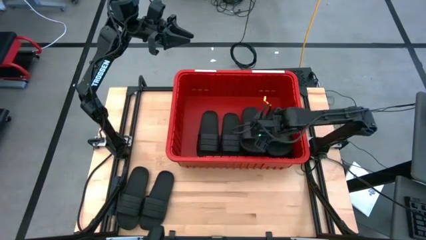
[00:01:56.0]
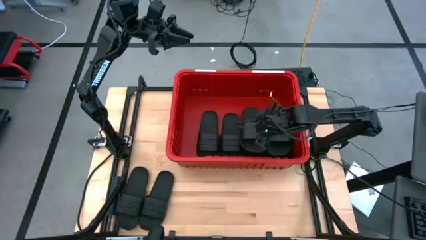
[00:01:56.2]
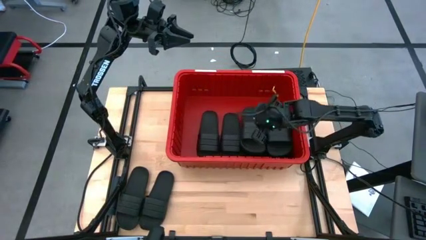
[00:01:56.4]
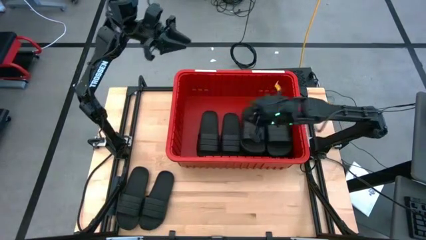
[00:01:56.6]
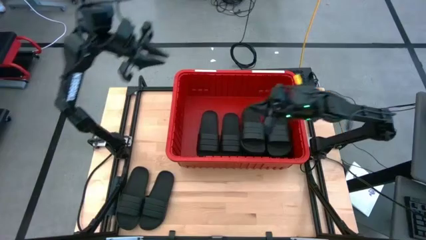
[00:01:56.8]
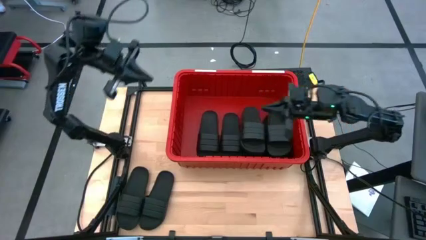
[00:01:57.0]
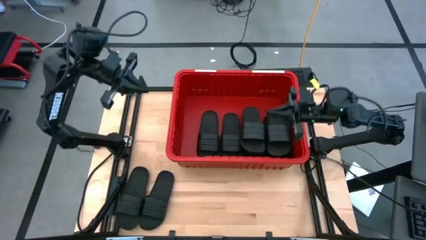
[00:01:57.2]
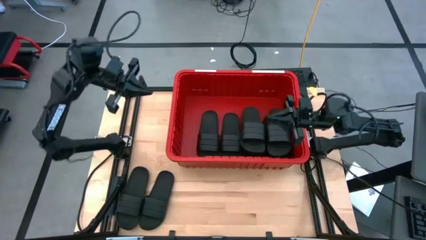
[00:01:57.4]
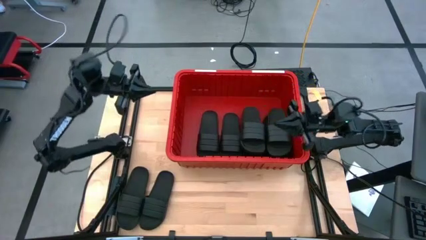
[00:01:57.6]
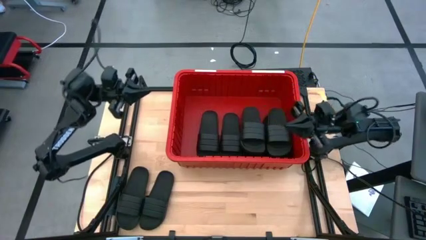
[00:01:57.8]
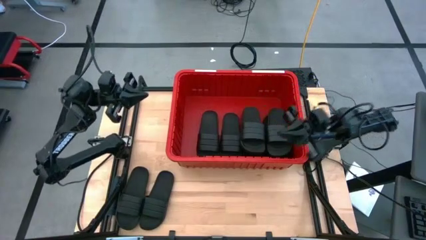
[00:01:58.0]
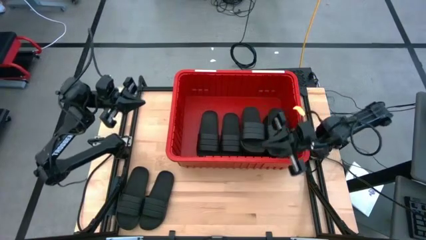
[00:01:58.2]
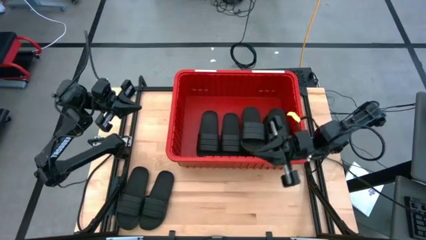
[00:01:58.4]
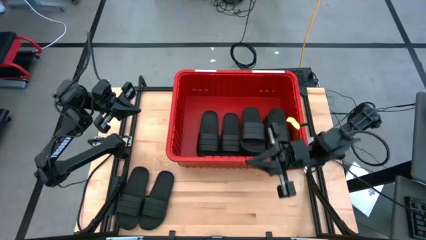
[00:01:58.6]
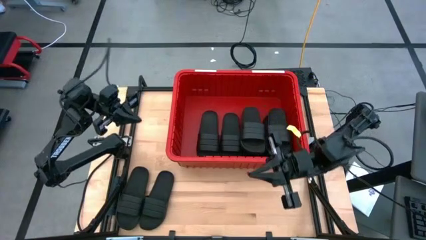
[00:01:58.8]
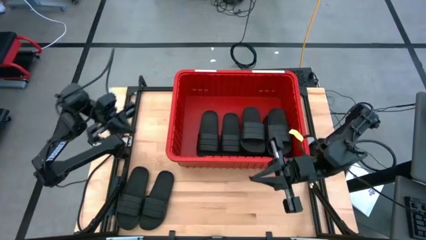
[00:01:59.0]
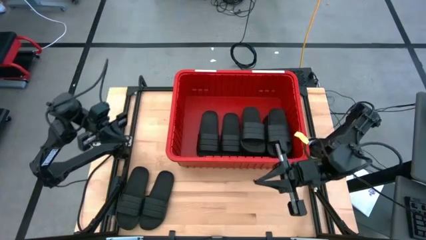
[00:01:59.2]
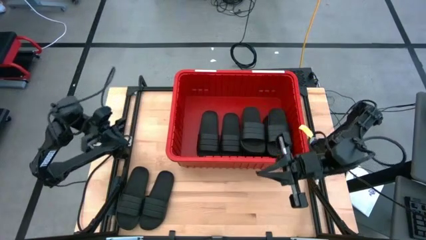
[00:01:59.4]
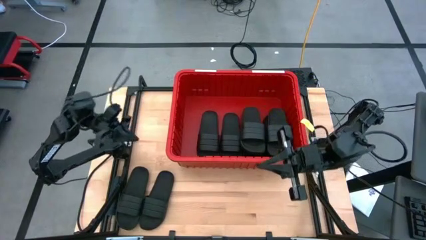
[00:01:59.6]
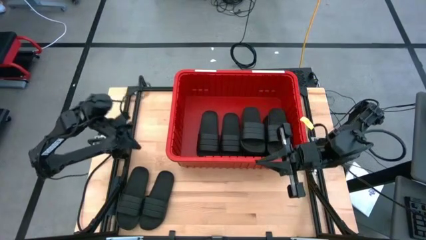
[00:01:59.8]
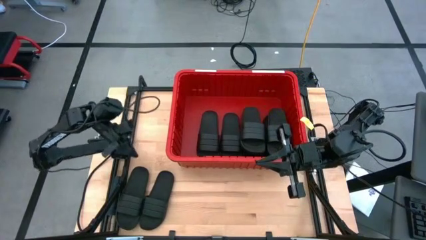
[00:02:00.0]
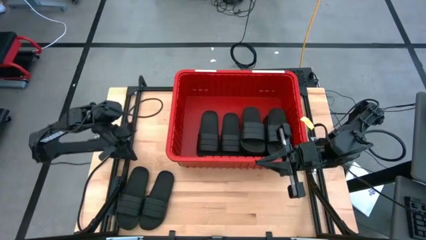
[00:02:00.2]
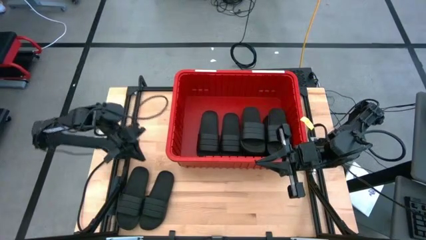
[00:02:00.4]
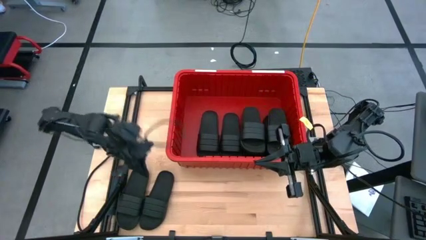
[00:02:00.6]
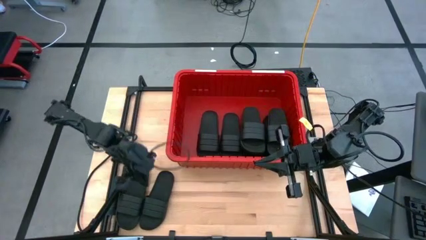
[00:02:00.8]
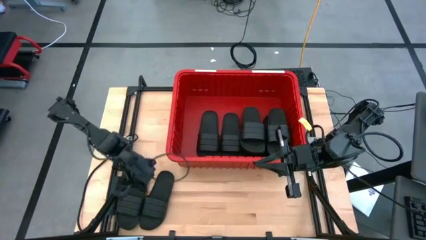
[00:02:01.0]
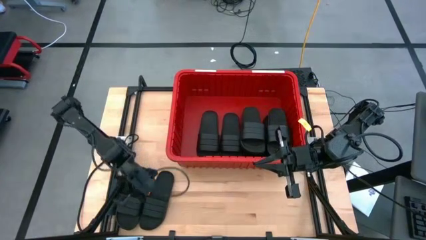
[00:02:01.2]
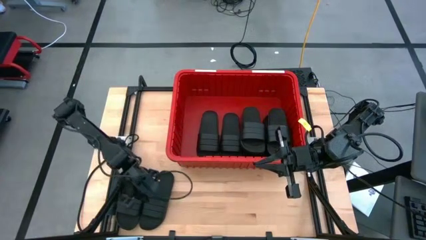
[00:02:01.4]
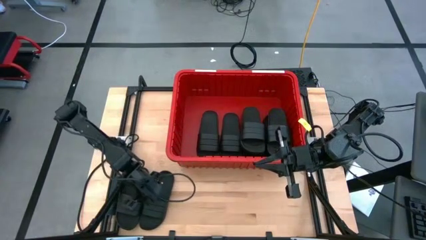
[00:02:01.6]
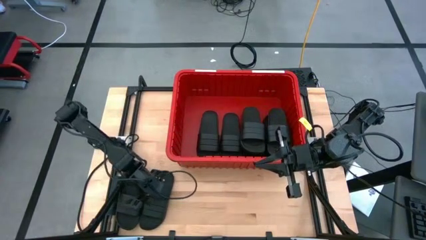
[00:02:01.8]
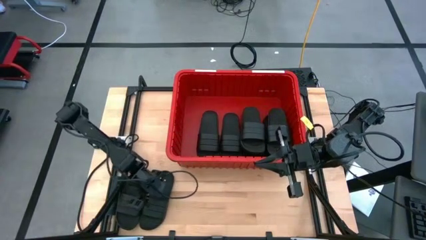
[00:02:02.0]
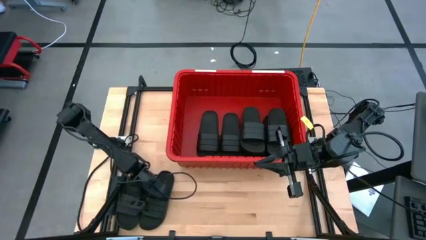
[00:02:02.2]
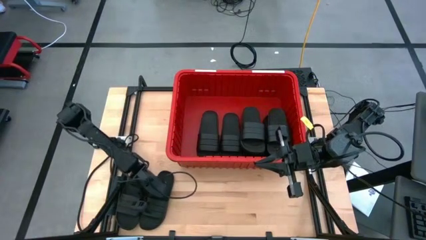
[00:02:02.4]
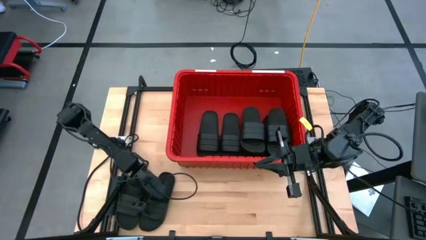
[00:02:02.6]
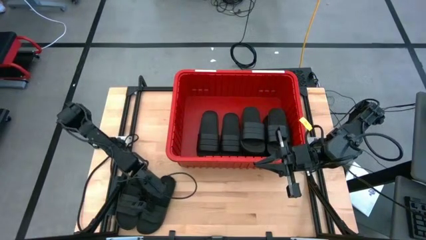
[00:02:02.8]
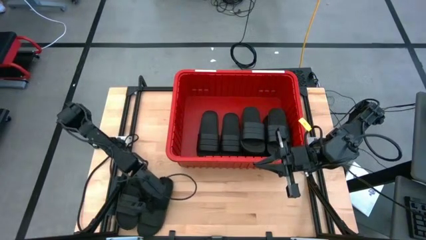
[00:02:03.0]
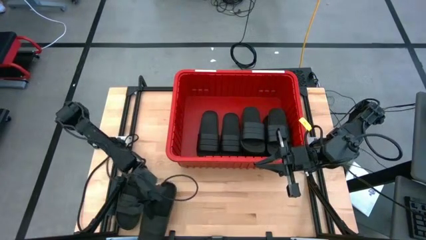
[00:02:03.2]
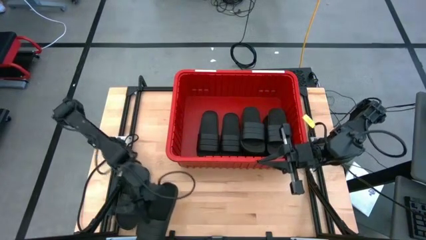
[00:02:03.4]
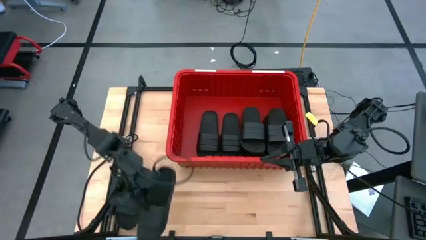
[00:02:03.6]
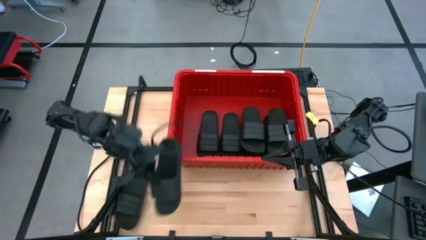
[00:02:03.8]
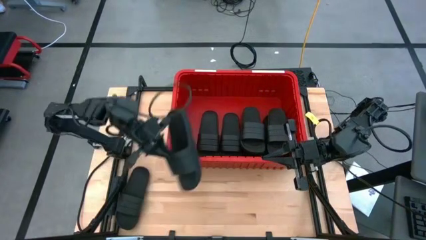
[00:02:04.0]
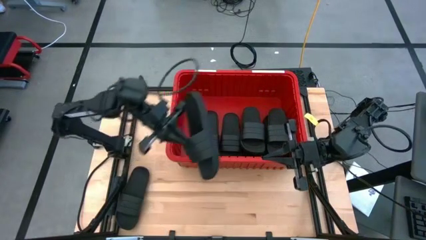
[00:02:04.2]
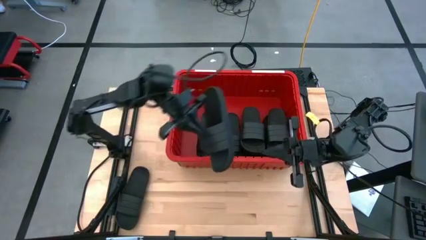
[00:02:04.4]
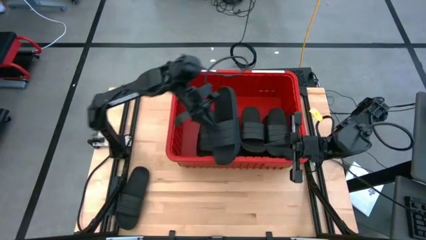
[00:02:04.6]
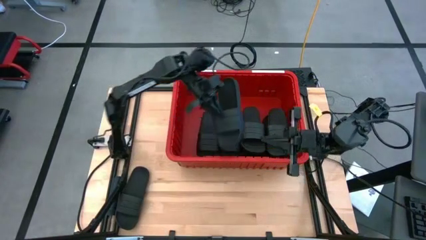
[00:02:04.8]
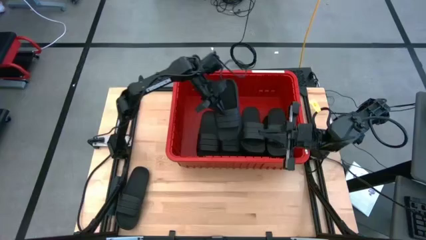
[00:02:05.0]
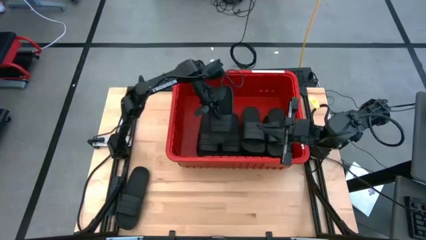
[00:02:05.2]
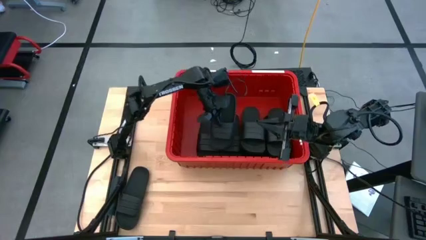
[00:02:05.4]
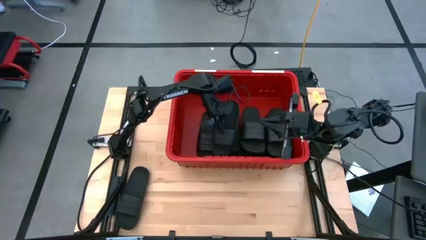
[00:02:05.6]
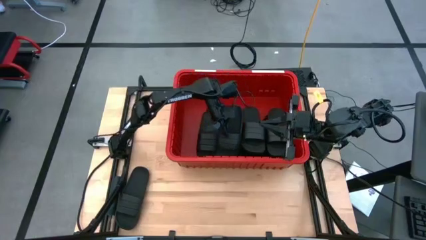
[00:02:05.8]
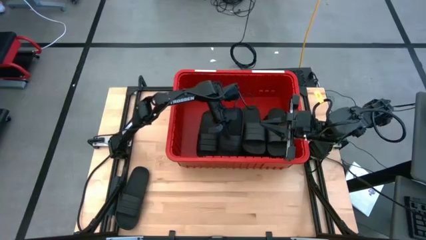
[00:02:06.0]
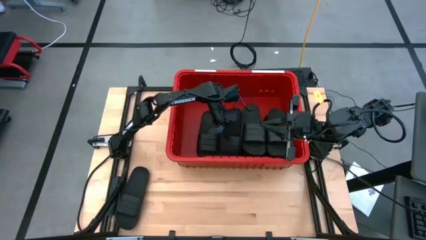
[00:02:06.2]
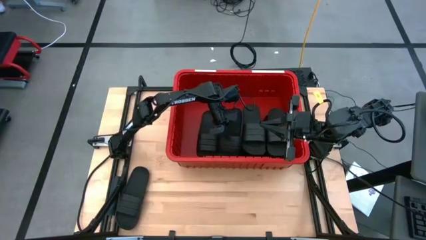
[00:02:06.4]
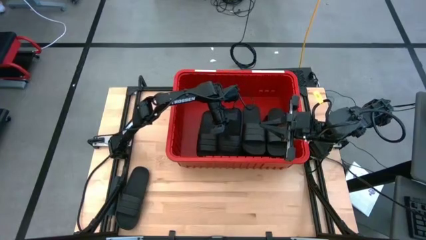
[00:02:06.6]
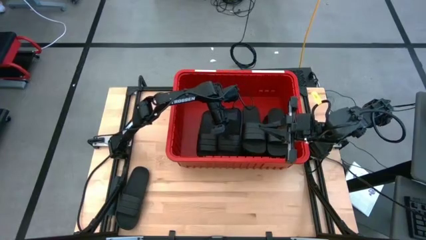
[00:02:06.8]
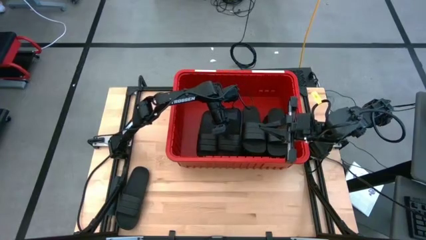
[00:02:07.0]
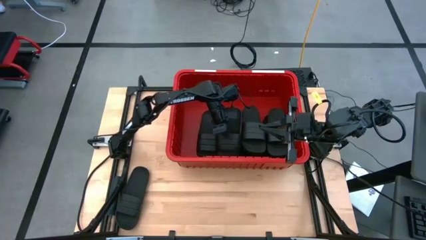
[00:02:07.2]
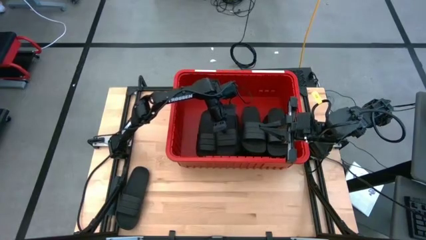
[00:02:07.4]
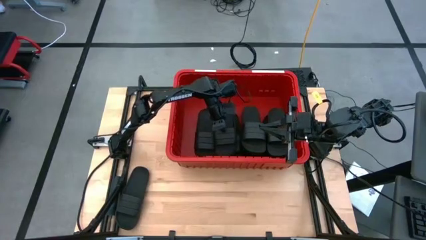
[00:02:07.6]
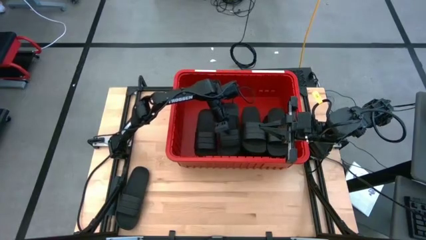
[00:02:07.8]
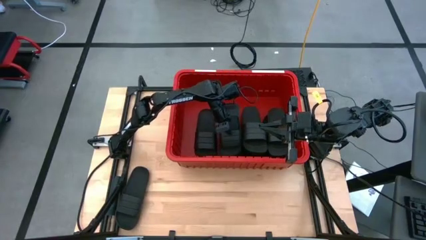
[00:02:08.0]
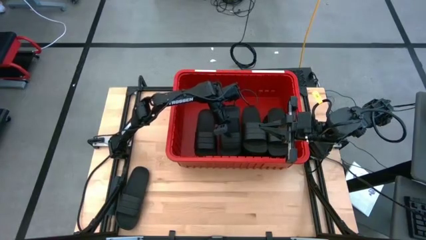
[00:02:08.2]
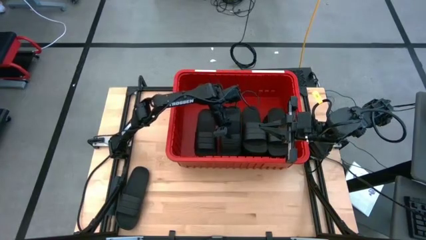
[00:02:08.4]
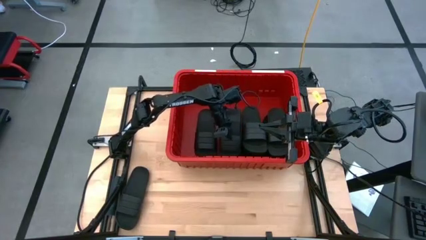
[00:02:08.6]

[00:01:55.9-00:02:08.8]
Task: Pick and place slides into bin
Put the black slide into the red bin

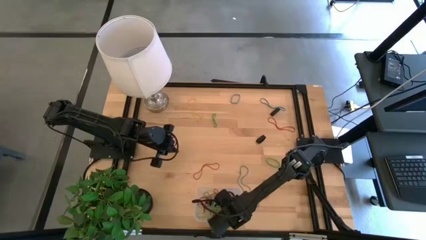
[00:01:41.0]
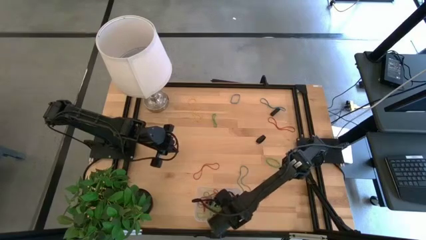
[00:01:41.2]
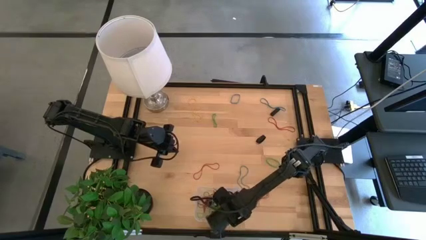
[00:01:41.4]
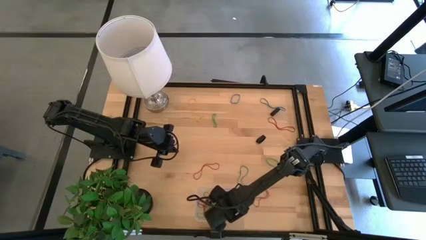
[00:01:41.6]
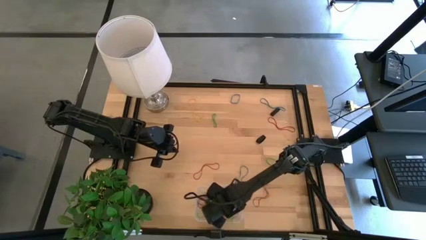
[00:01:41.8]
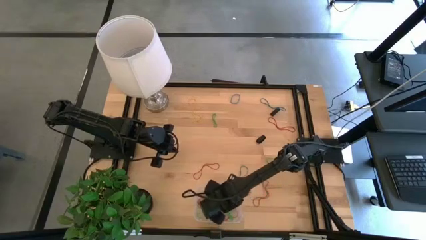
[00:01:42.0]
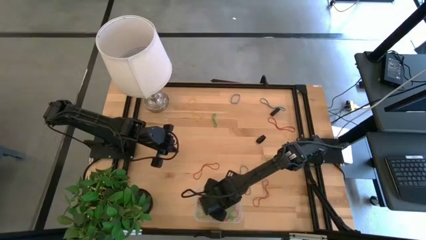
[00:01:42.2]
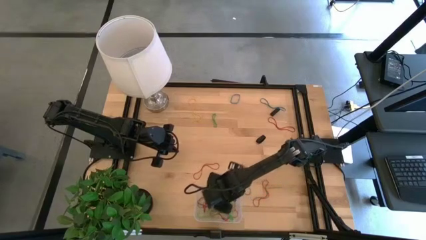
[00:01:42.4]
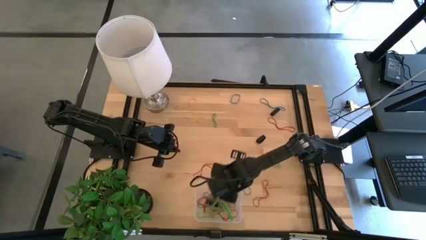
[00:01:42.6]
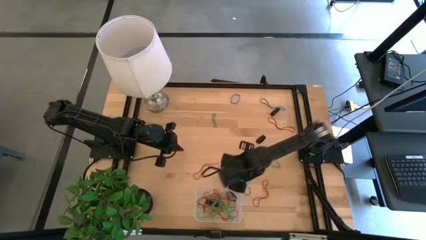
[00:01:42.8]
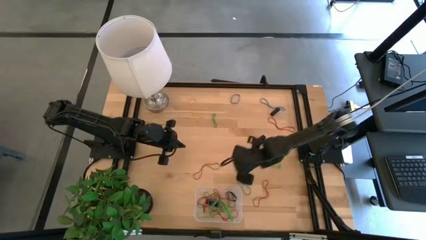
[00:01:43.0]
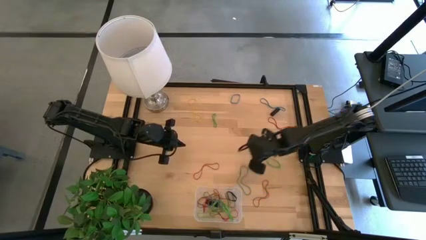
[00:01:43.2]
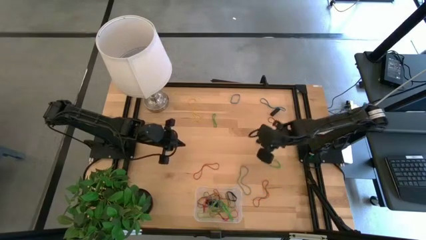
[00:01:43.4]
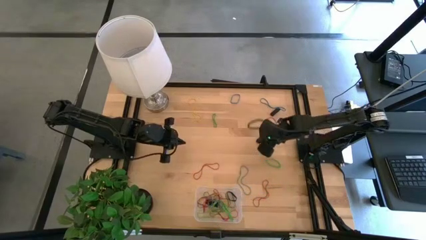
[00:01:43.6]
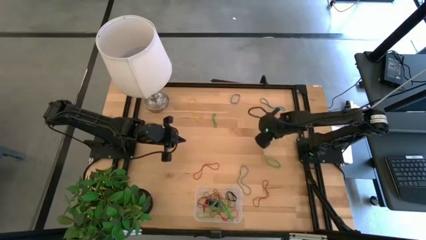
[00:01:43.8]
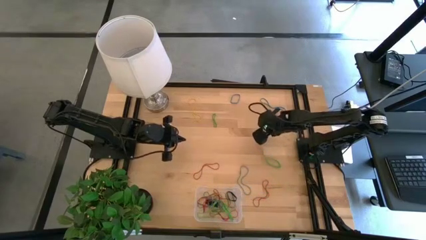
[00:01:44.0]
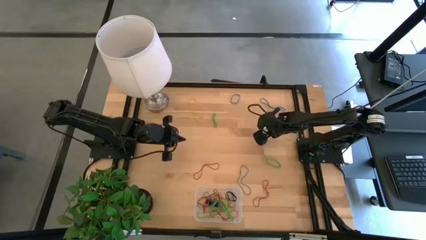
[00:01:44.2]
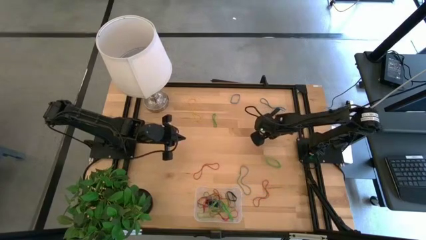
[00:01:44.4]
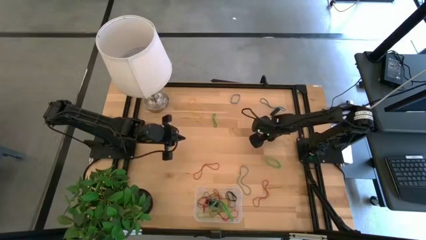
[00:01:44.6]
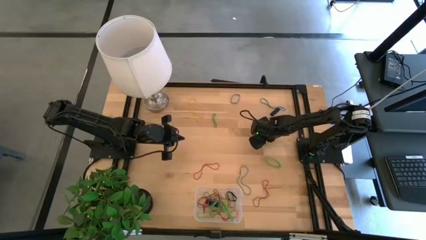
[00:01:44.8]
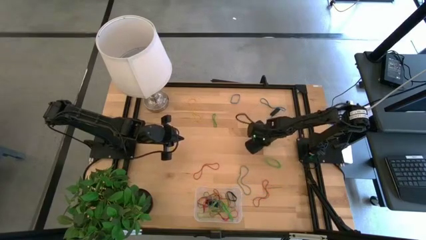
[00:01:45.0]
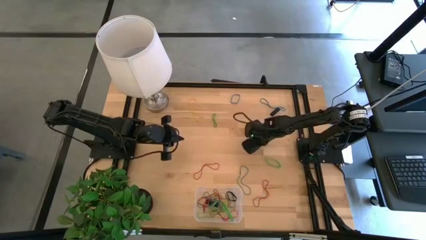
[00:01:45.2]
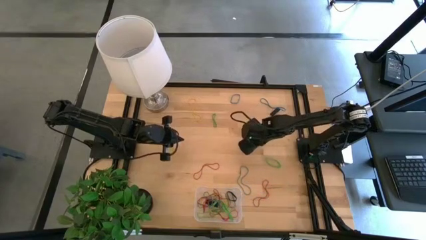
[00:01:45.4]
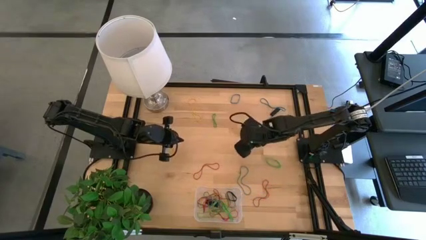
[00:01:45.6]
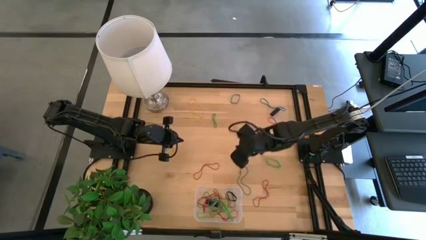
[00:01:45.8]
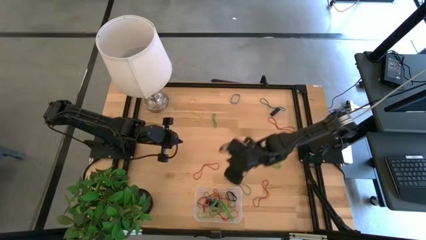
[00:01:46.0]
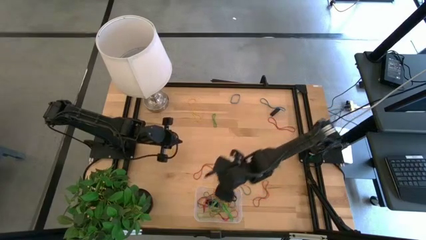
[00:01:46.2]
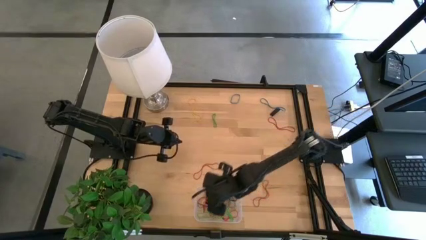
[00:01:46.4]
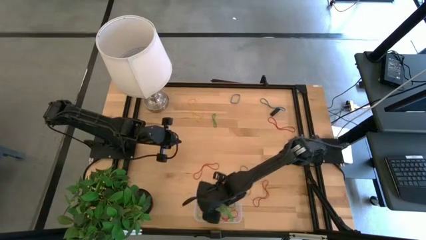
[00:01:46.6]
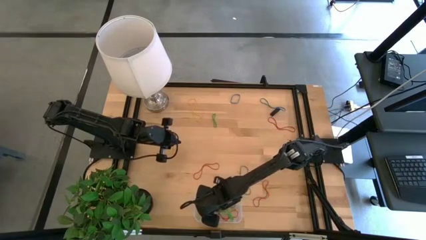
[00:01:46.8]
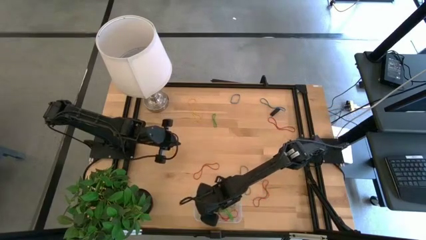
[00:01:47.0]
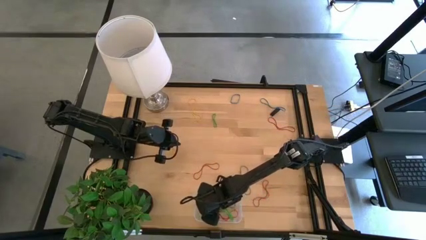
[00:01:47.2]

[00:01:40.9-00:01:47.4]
Task: Pick and place rubber bands into bin
Put the black rubber band into the transparent bin
